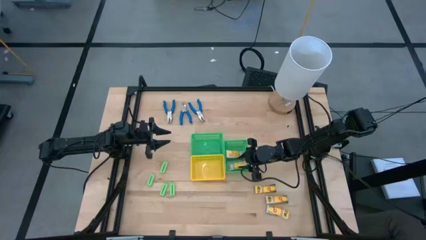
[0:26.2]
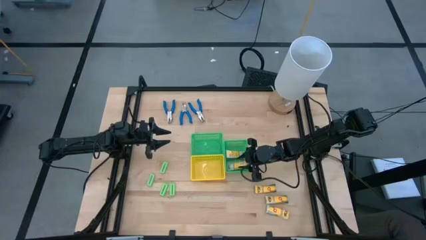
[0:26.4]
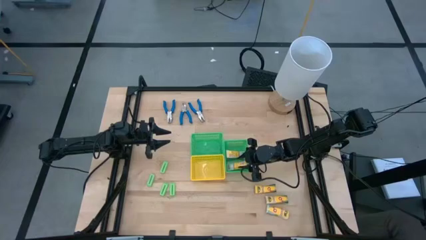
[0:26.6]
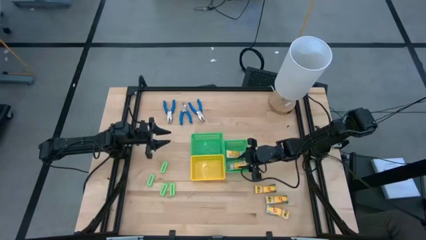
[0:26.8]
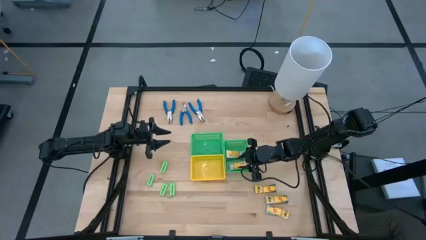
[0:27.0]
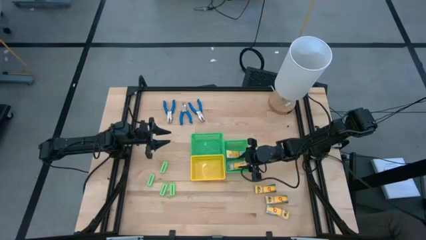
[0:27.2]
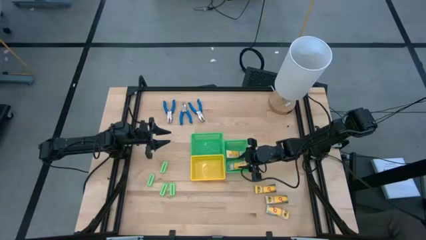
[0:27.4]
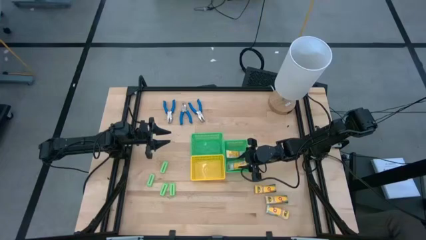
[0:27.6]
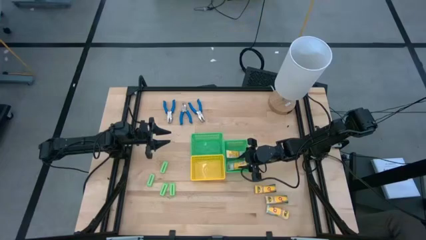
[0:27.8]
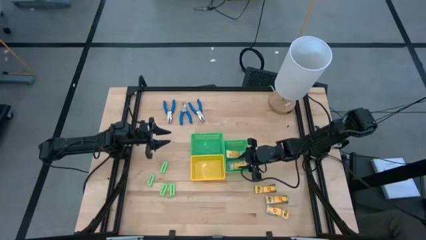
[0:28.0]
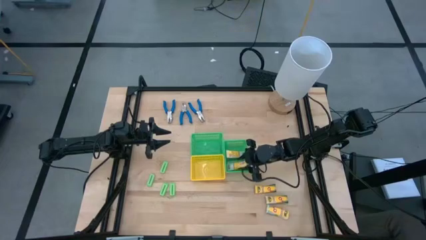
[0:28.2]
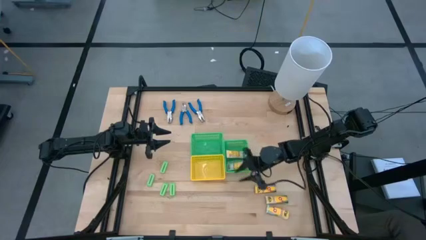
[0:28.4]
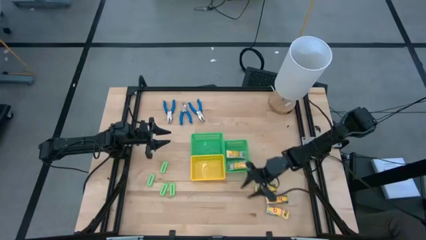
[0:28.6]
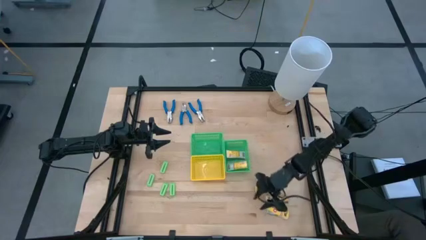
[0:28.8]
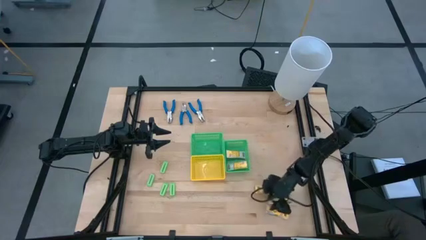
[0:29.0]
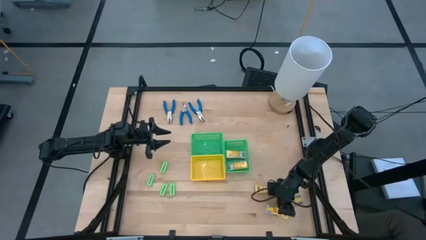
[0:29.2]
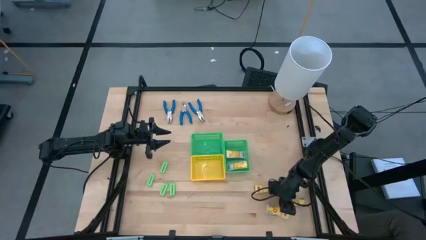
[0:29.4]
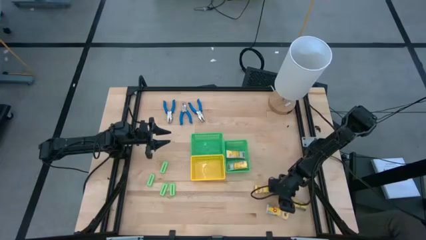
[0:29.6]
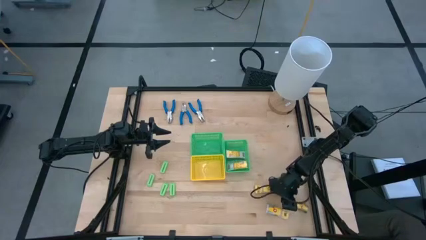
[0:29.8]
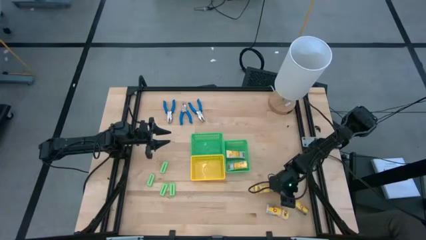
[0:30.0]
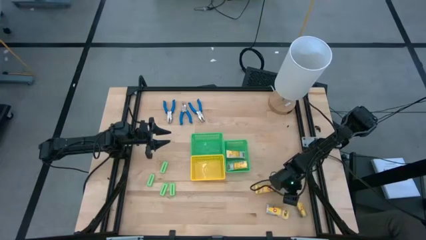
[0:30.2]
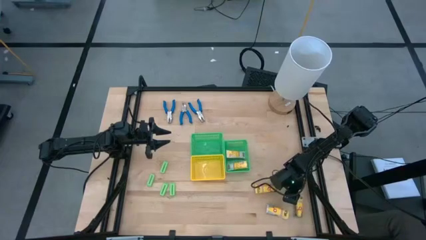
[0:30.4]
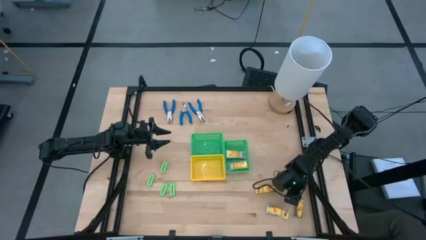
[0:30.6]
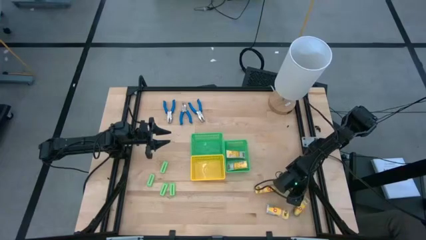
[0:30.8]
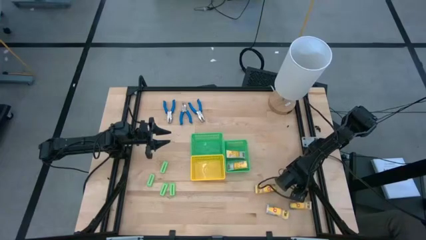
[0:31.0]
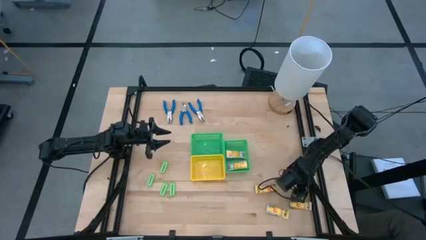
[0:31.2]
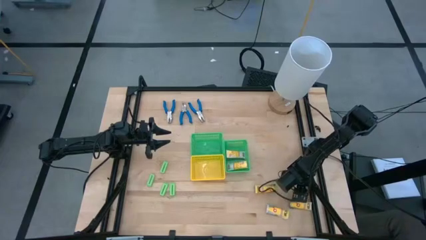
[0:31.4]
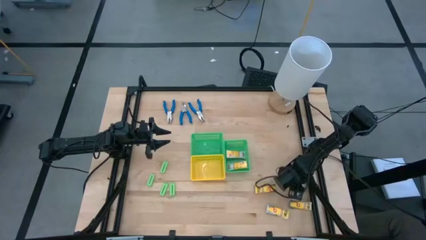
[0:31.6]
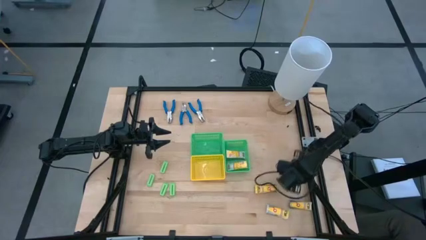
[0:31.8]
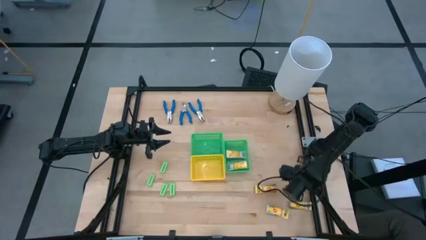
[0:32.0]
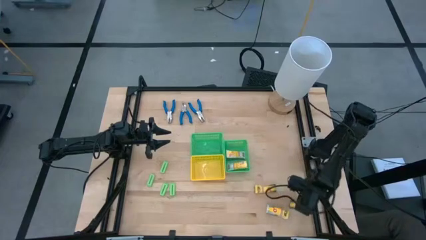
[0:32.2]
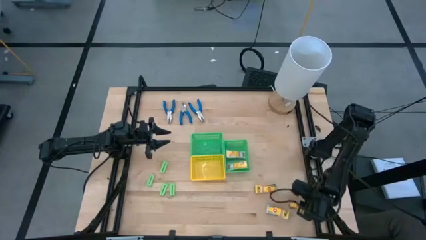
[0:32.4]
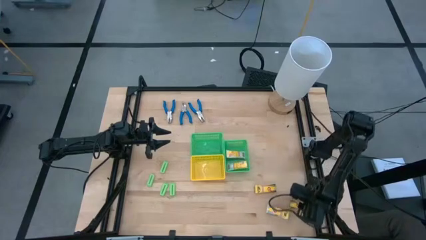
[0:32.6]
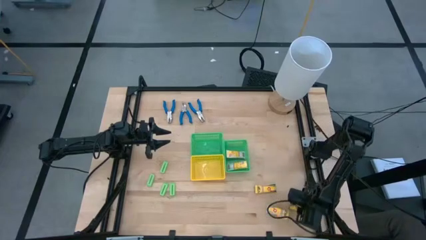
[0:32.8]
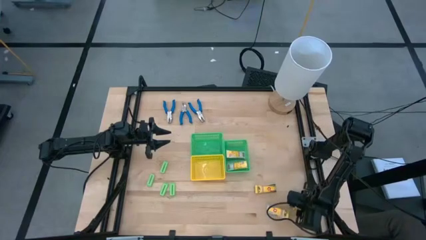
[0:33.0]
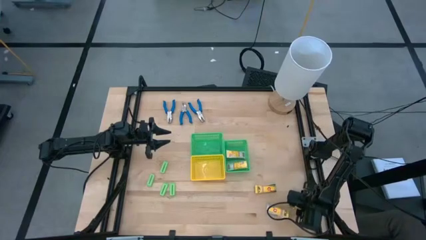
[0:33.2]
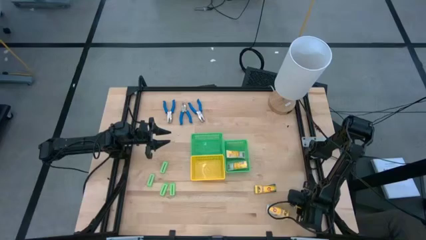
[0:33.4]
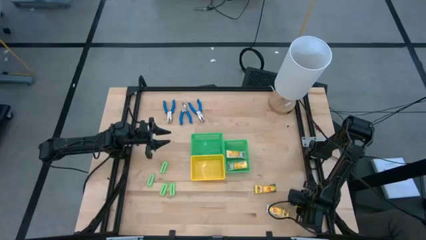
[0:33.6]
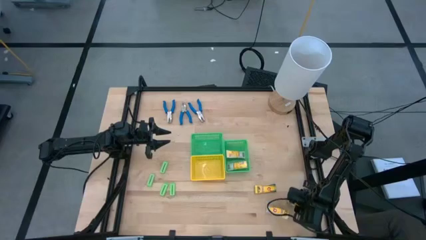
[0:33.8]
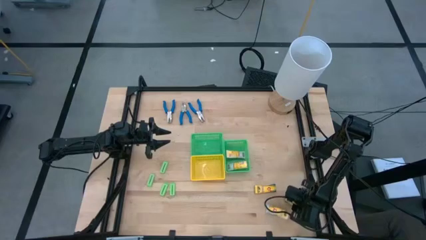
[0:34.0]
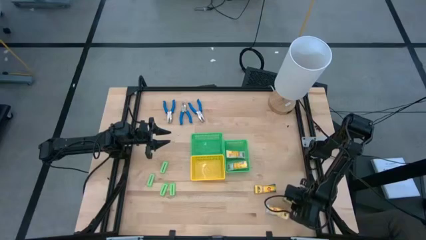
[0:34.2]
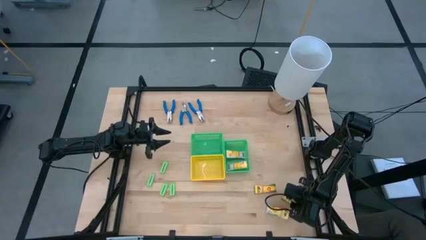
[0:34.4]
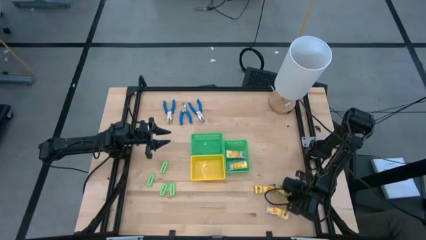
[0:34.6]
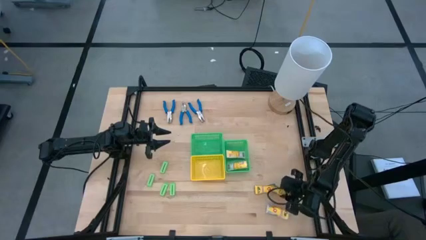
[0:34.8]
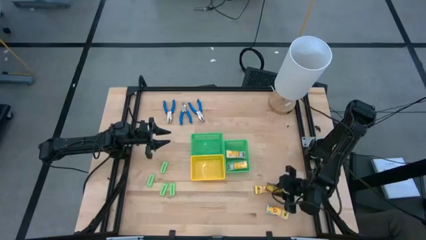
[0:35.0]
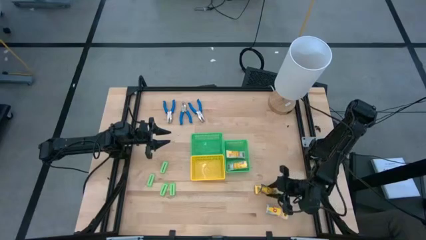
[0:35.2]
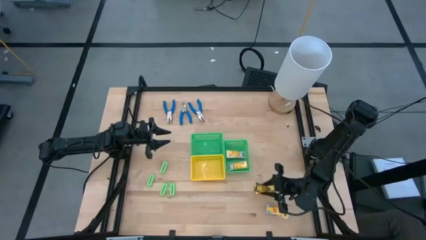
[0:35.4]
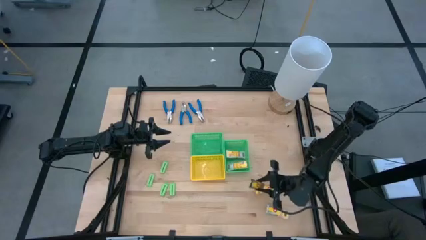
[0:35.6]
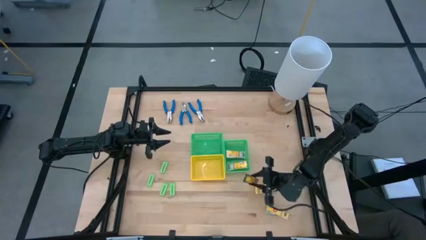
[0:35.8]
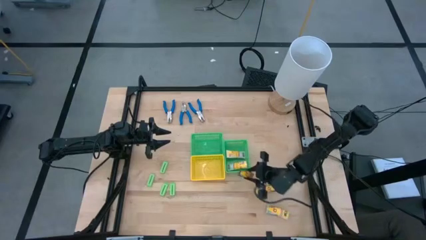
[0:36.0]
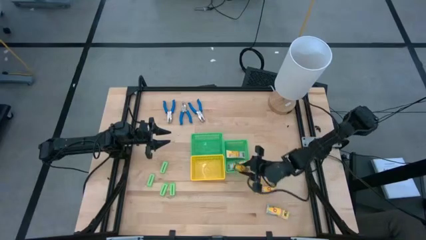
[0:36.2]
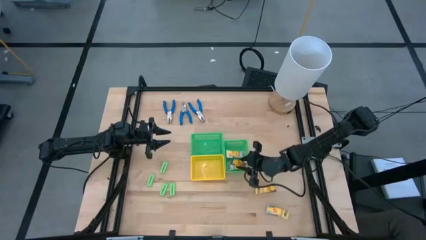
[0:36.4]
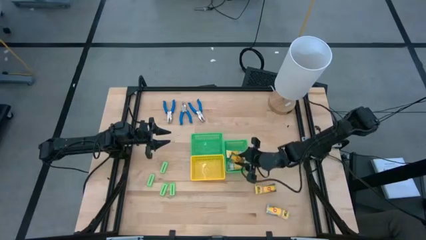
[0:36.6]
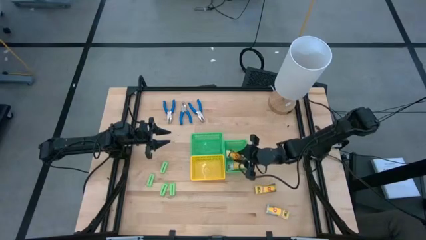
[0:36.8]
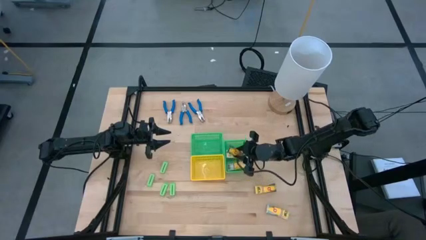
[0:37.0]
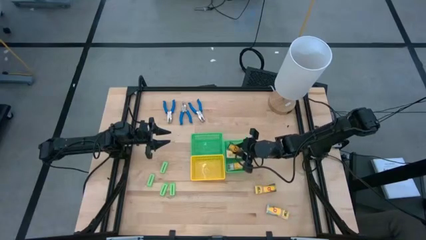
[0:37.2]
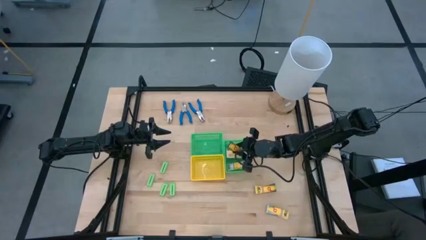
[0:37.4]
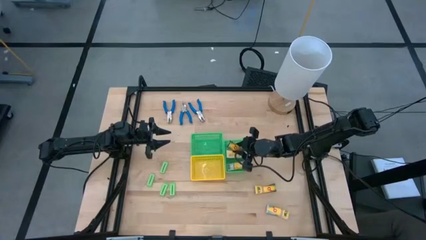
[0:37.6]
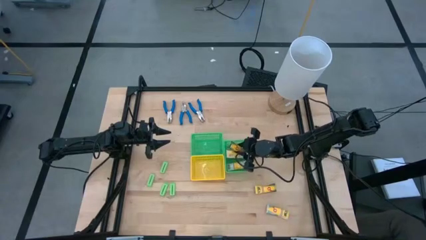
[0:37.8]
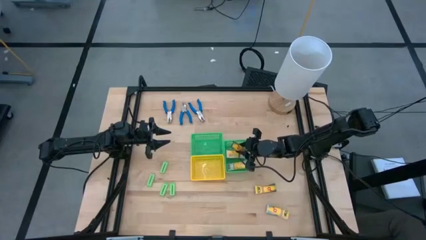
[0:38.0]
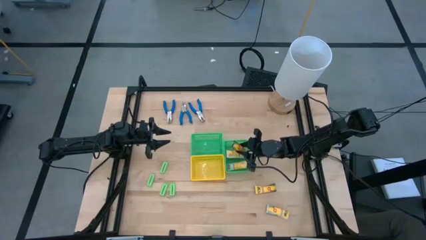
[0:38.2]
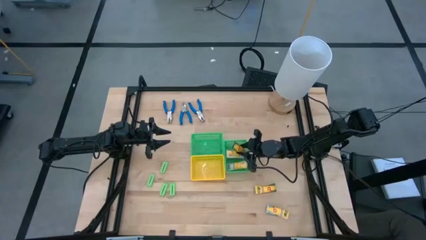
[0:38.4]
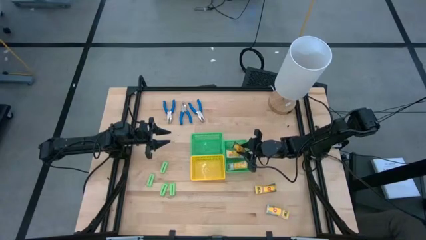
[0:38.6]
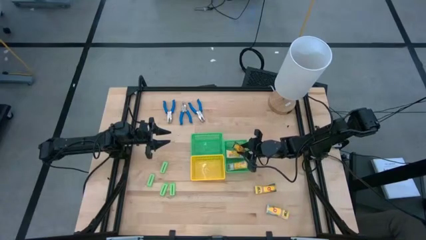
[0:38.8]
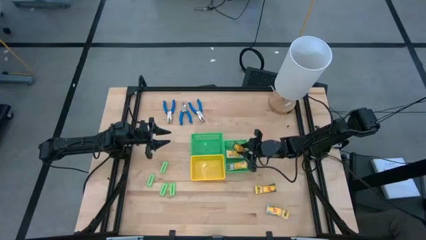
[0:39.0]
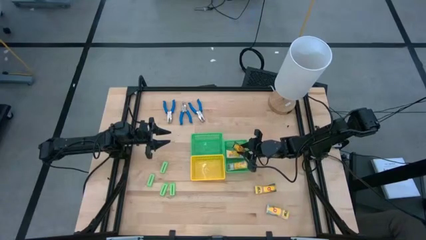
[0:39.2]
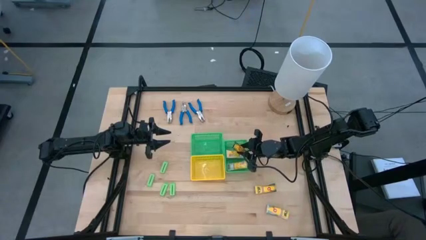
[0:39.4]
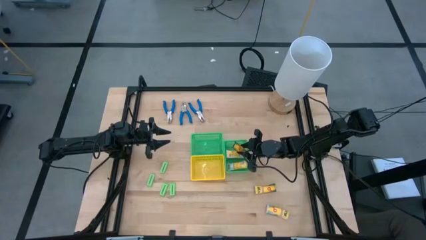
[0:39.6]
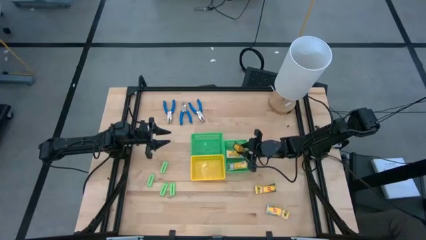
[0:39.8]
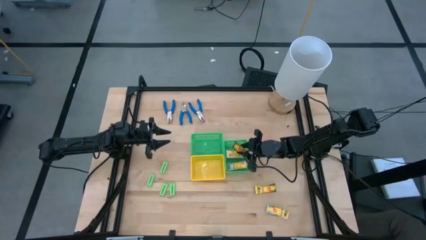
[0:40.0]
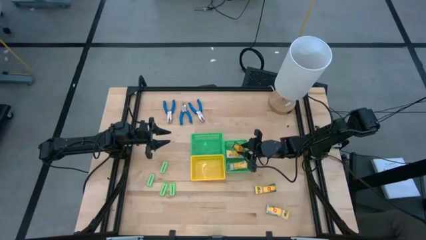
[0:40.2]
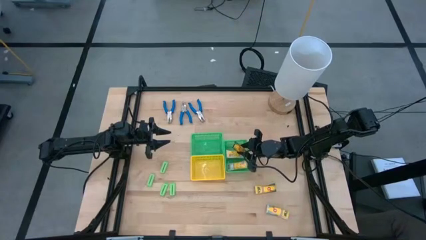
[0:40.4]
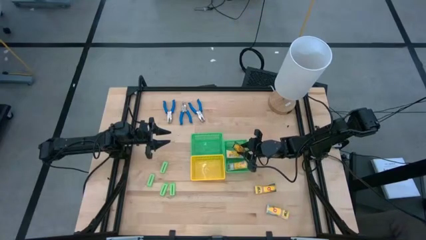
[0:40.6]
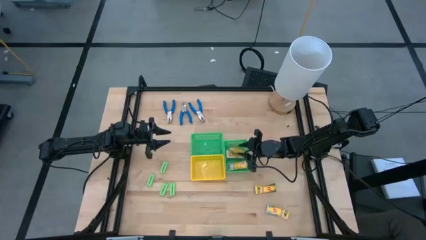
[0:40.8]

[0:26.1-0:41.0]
Task: Pick & Place School Supplies
Put the yellow crayon box into the right green bin
